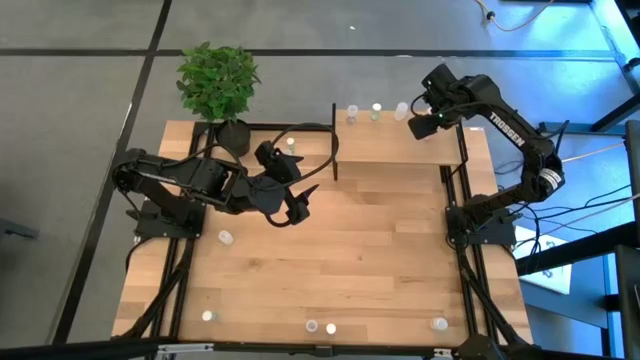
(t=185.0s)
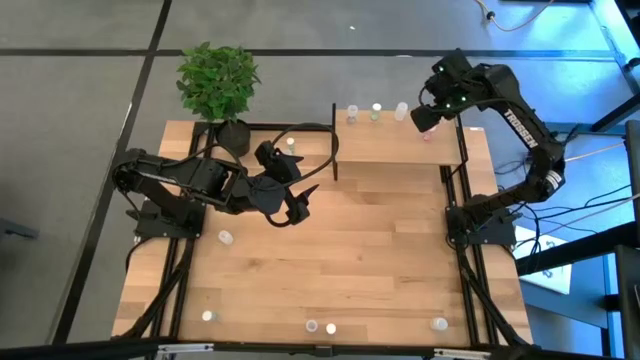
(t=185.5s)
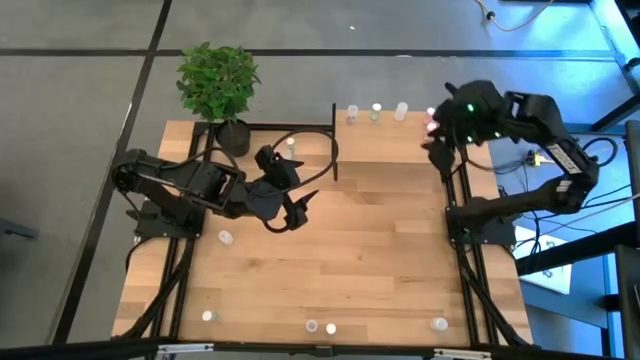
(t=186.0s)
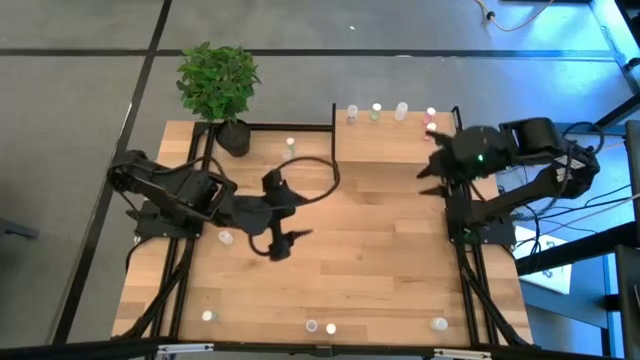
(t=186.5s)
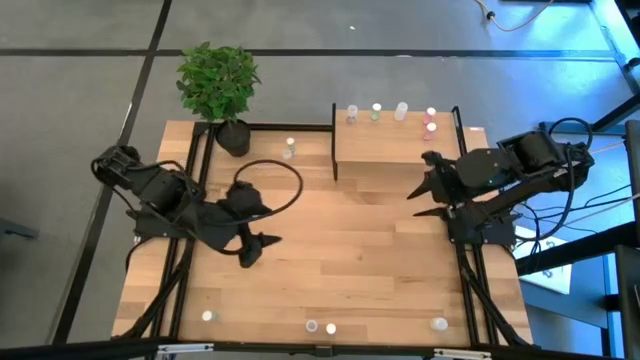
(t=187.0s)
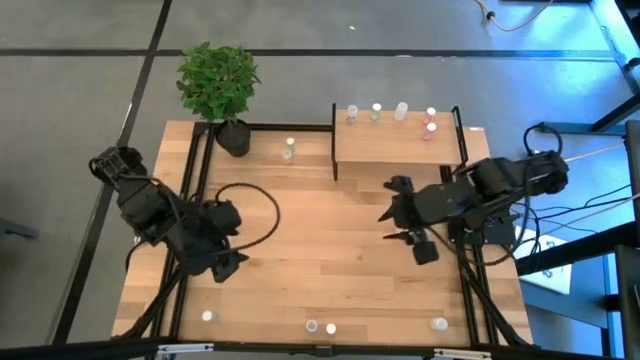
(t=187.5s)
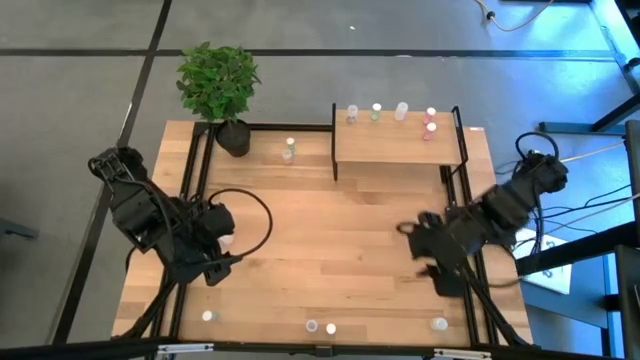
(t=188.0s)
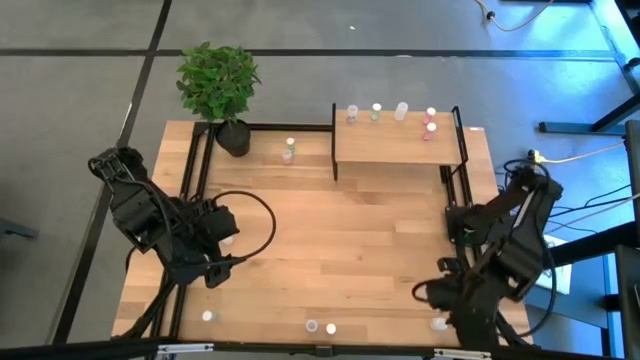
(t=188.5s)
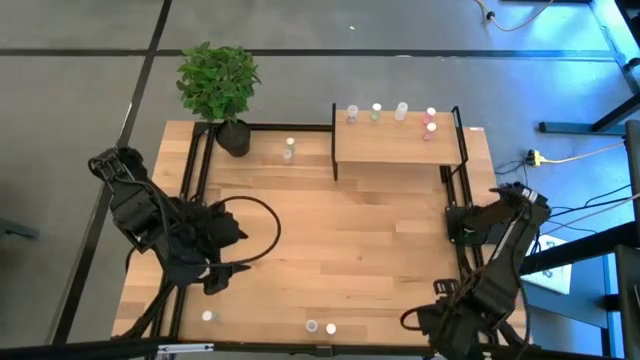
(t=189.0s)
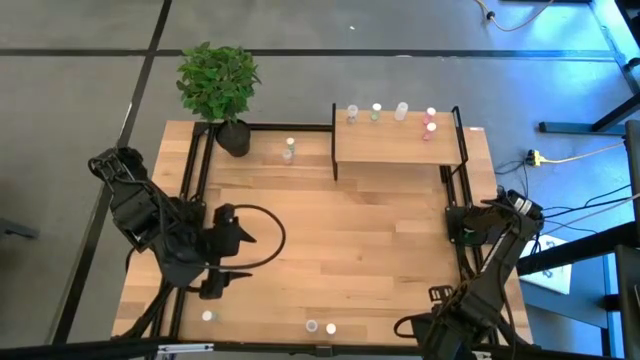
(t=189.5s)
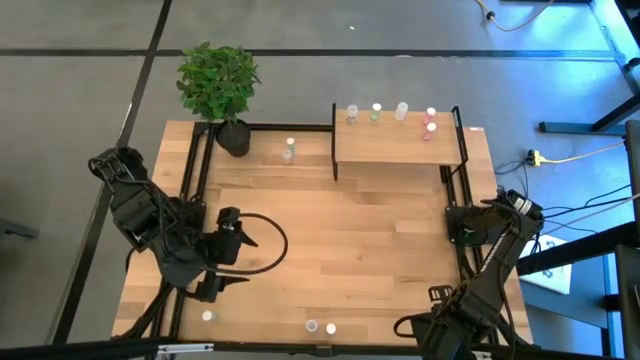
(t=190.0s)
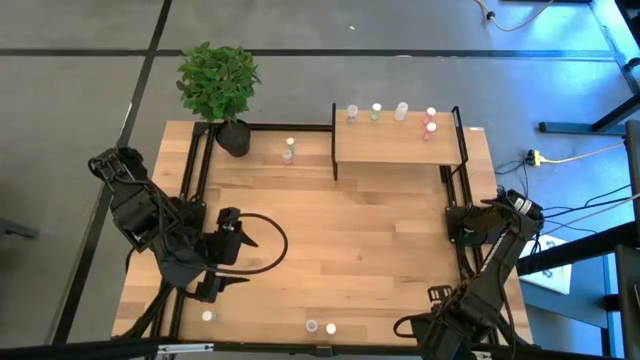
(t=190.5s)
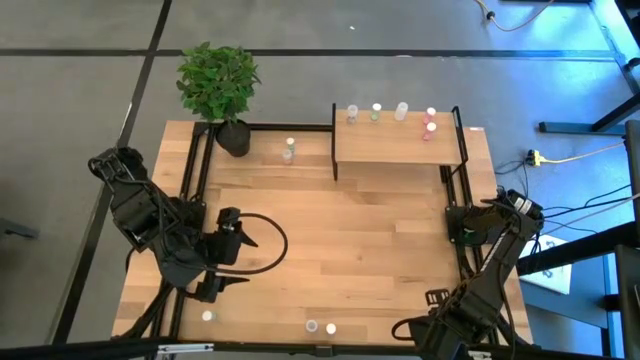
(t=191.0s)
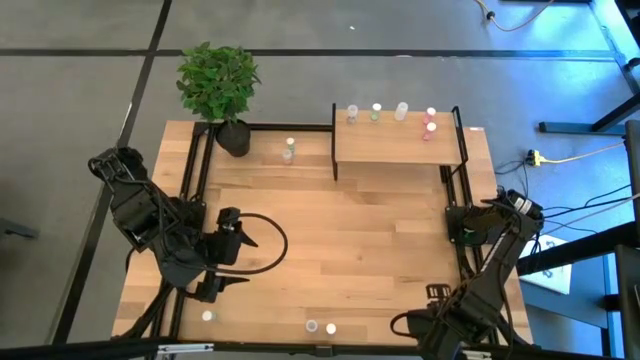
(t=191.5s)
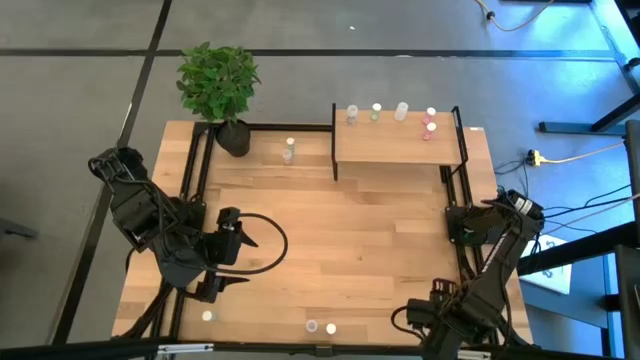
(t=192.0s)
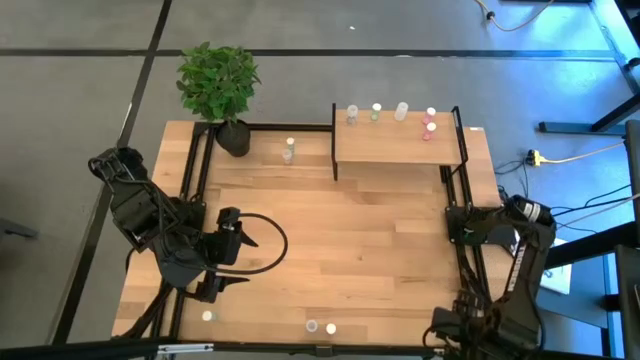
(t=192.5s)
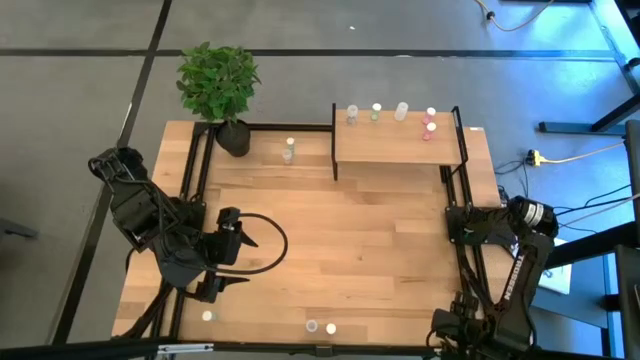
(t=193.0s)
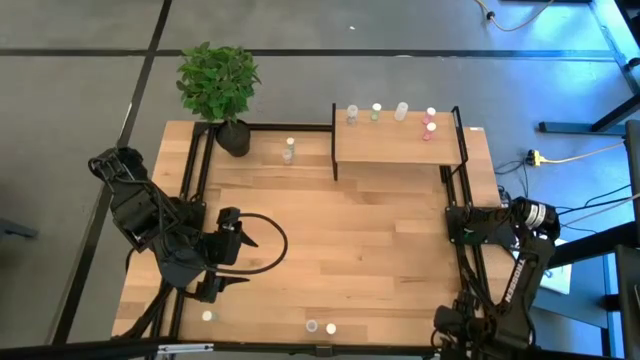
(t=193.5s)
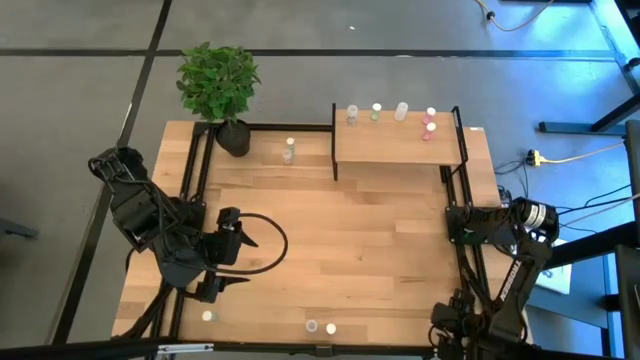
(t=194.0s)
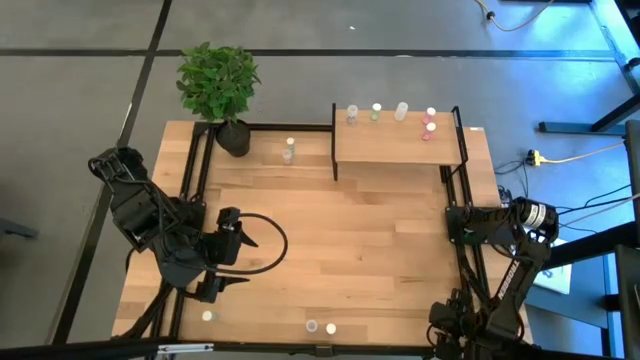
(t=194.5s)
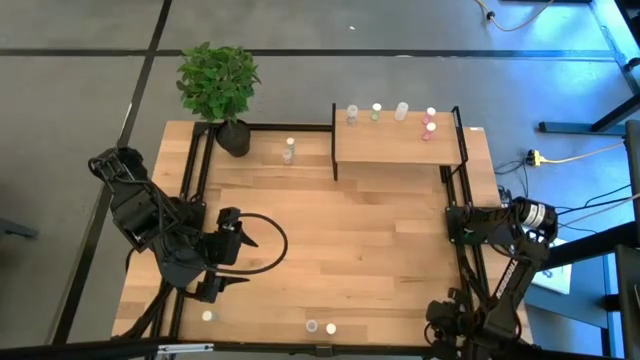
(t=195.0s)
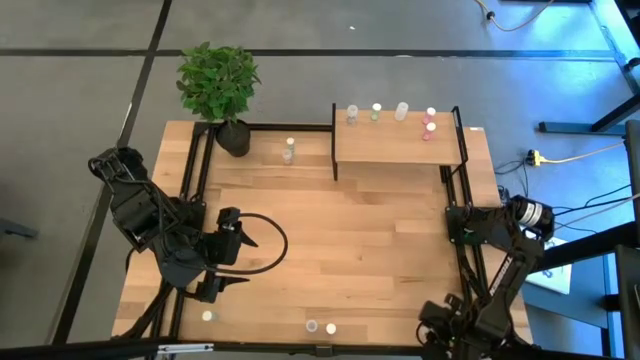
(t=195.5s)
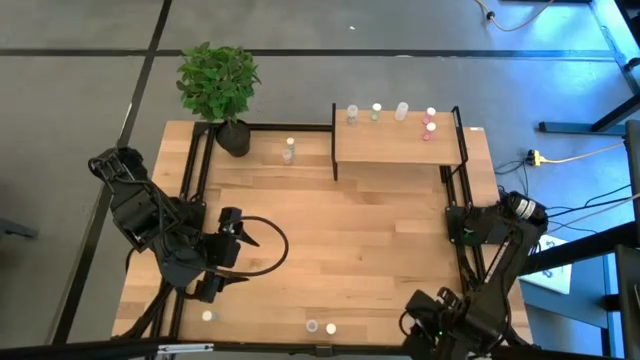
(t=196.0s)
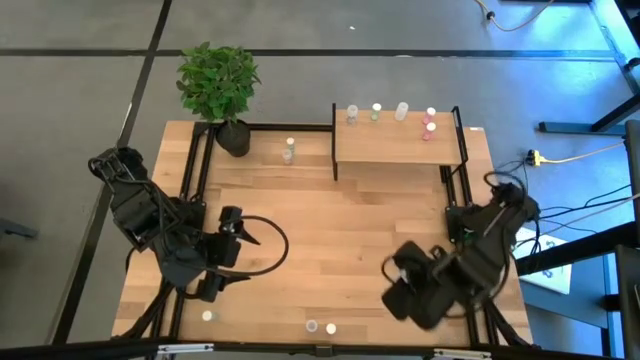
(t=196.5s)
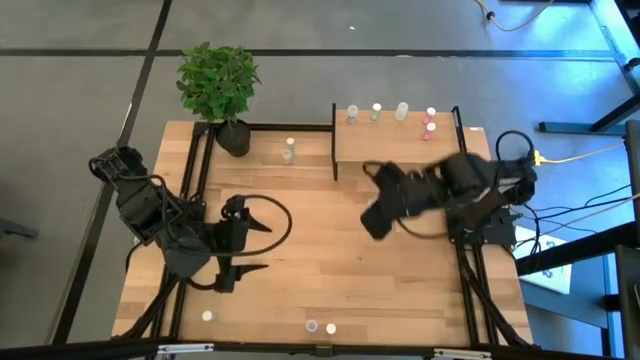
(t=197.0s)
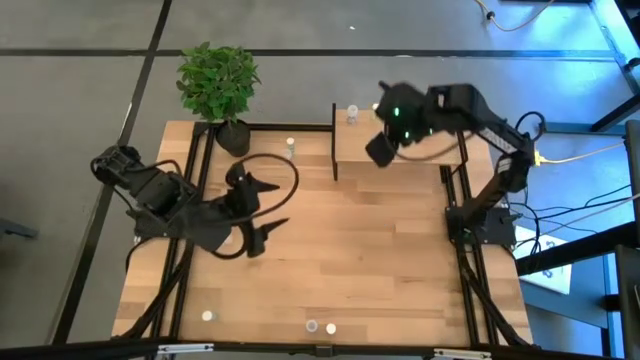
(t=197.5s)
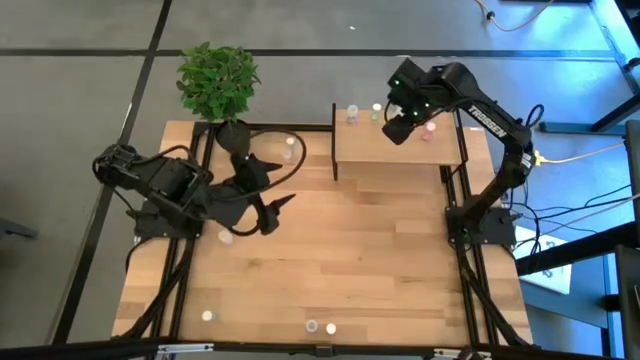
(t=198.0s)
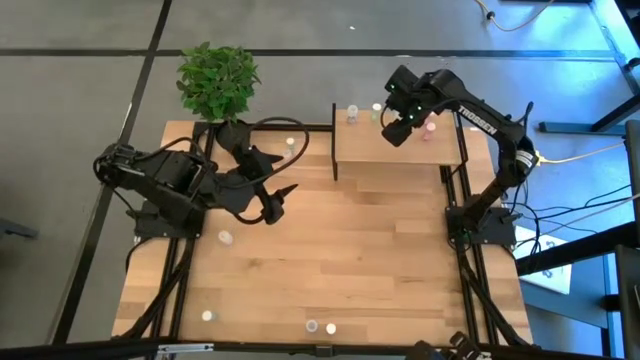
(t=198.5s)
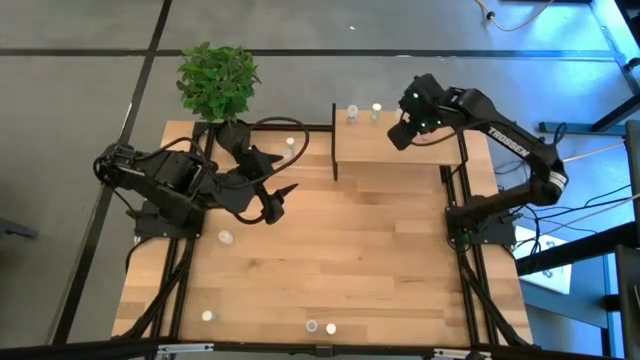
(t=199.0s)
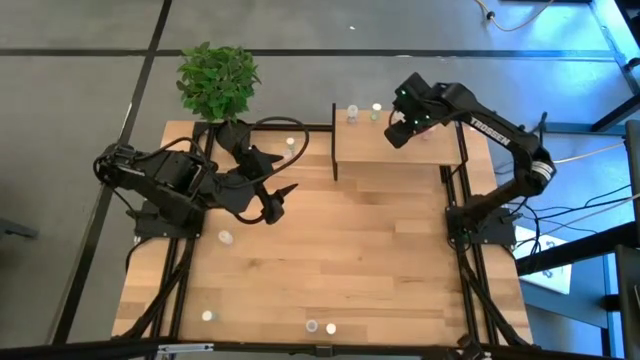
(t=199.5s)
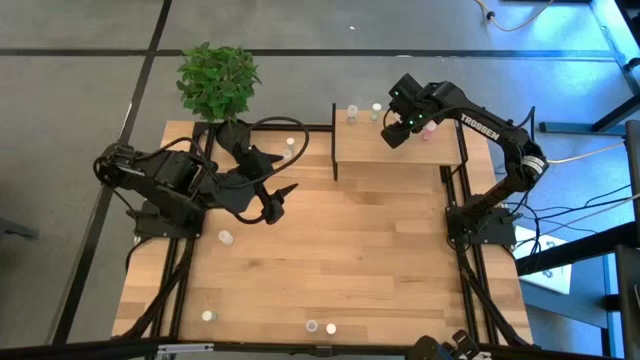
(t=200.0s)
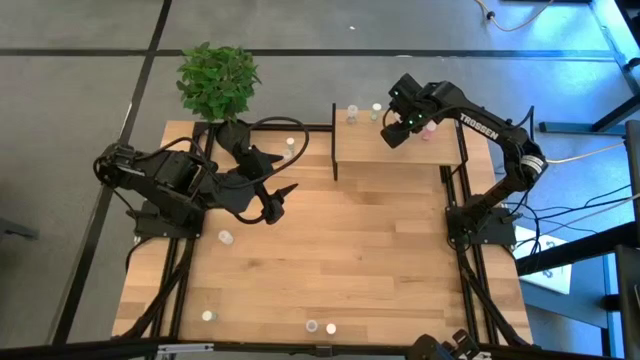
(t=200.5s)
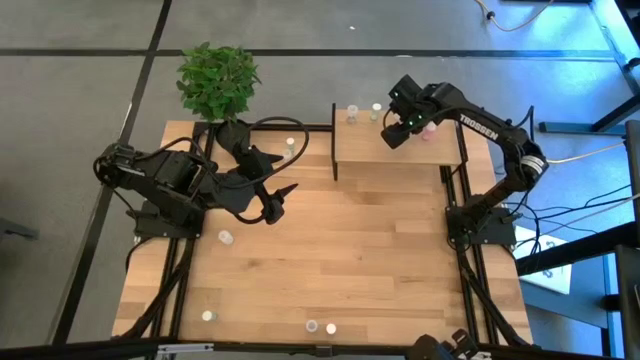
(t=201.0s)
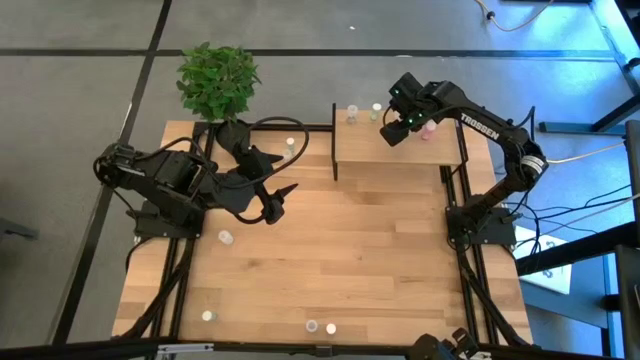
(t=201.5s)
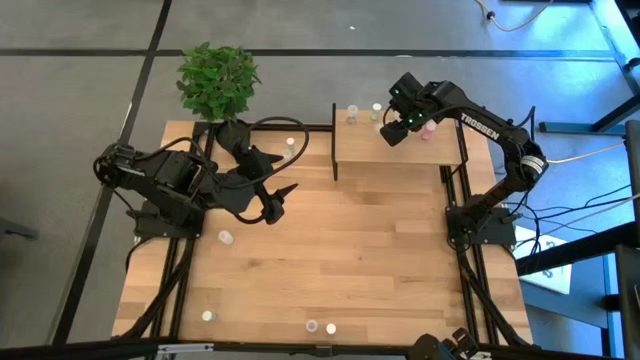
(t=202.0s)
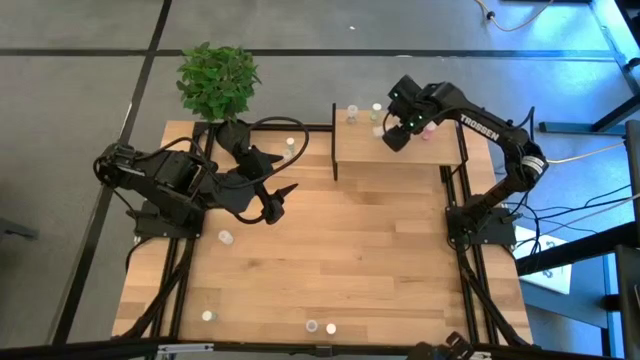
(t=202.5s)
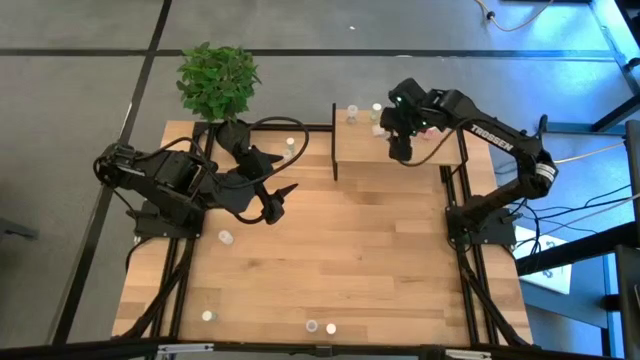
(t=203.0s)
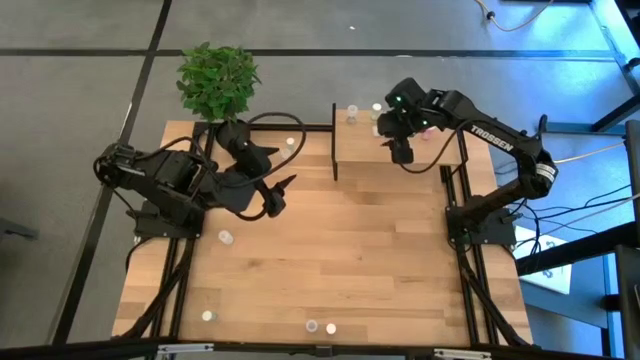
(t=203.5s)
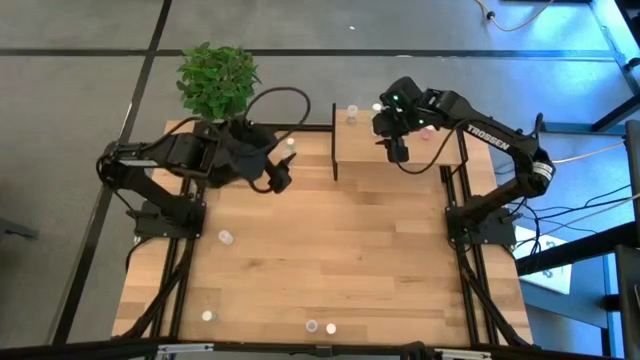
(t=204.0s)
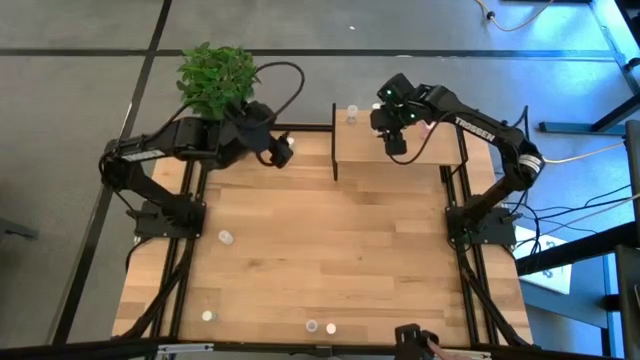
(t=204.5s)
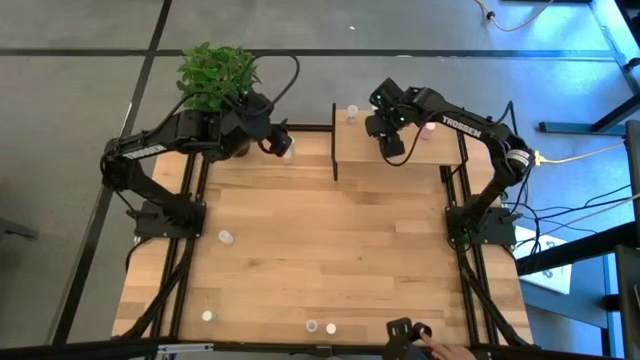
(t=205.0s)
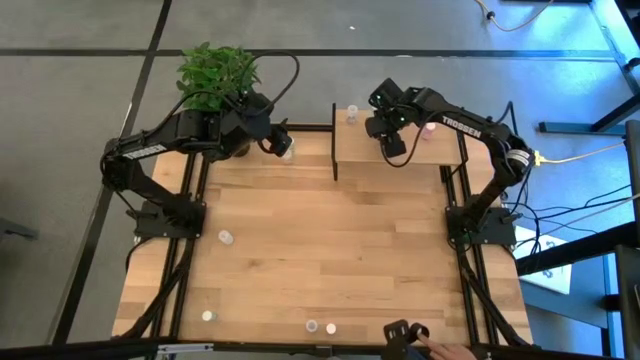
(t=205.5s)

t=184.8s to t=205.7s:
Task: Pick and place medicine bottles onto shelf by color
Put the bottom white pill bottle aligned with the other white pill bottle on the shelf
